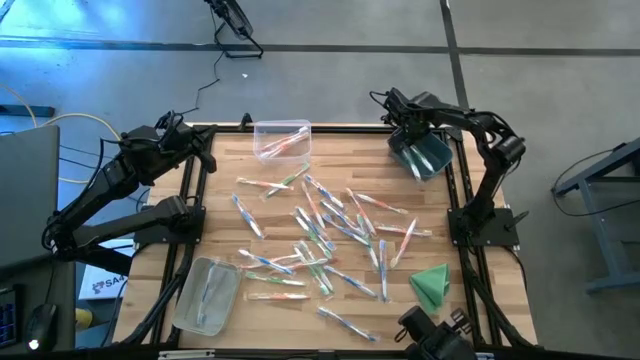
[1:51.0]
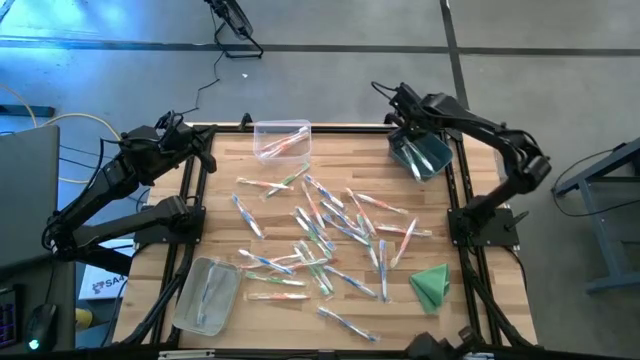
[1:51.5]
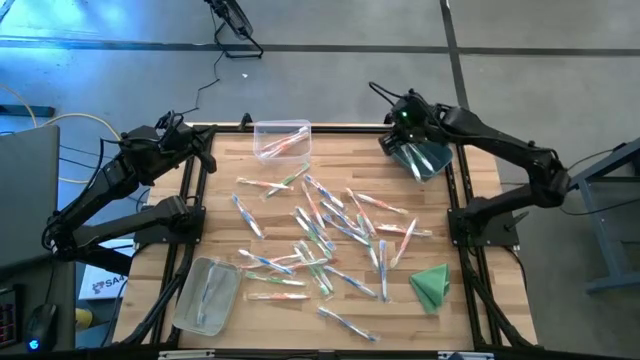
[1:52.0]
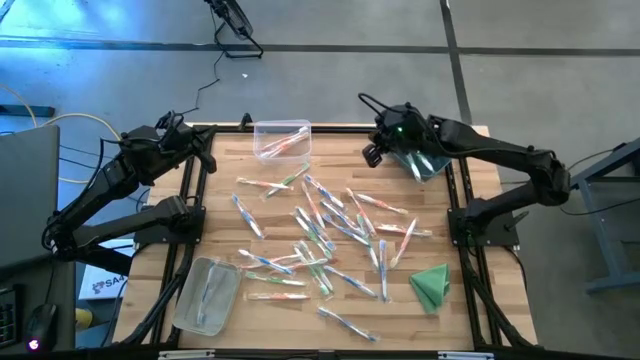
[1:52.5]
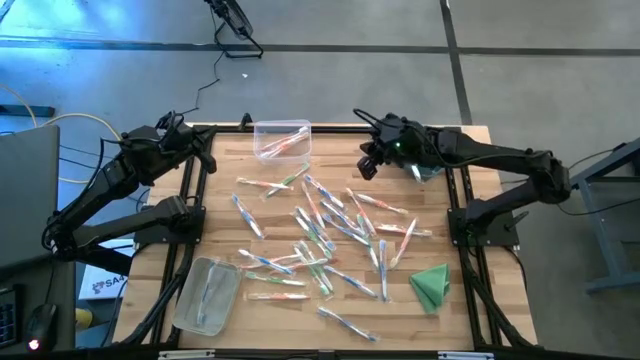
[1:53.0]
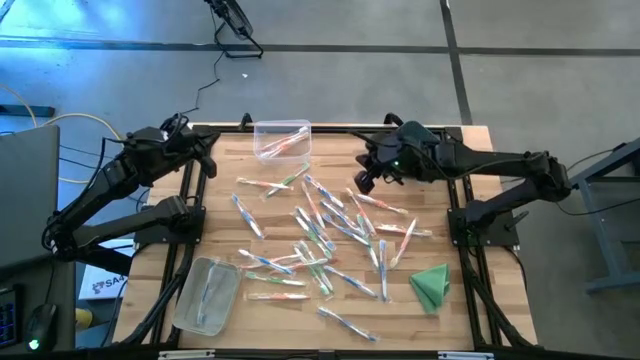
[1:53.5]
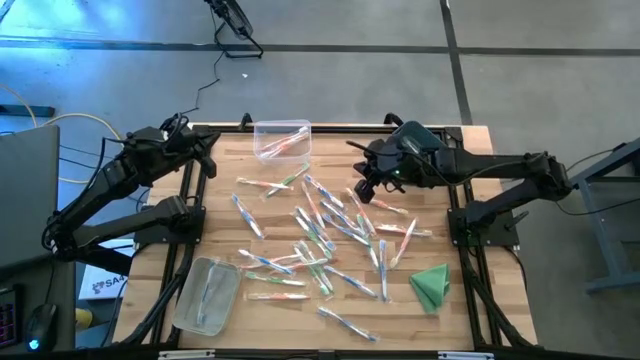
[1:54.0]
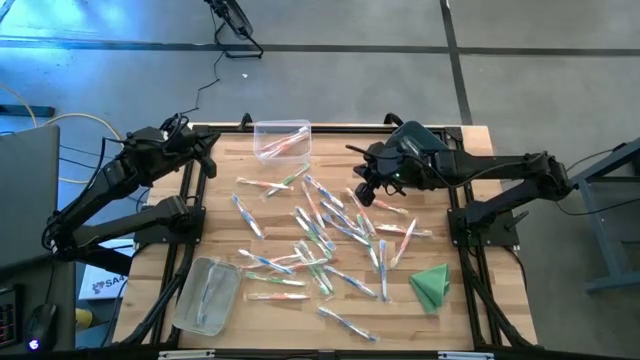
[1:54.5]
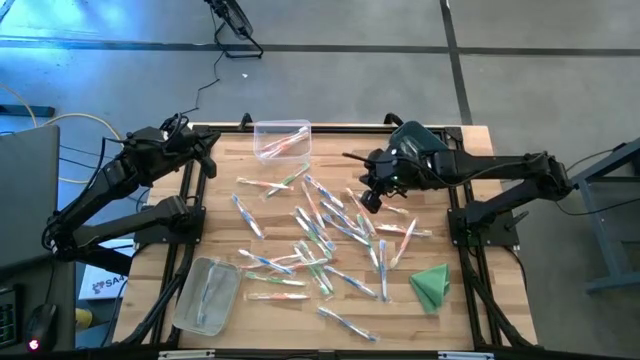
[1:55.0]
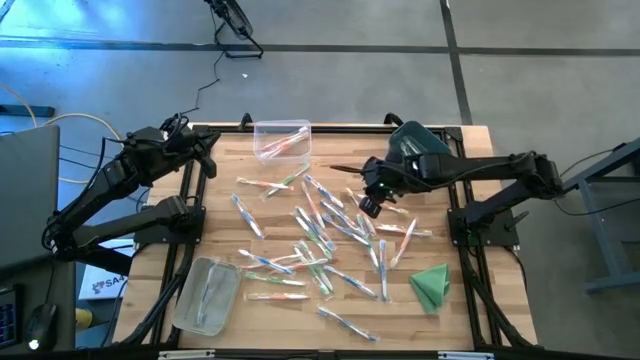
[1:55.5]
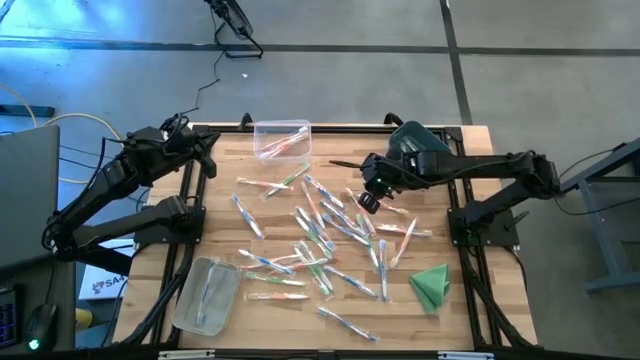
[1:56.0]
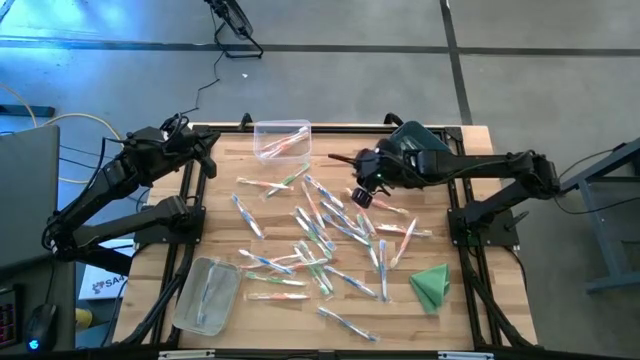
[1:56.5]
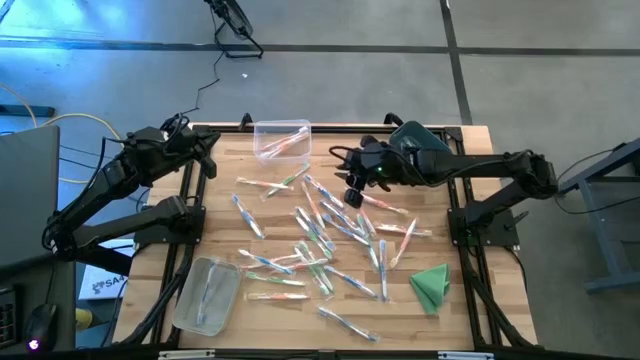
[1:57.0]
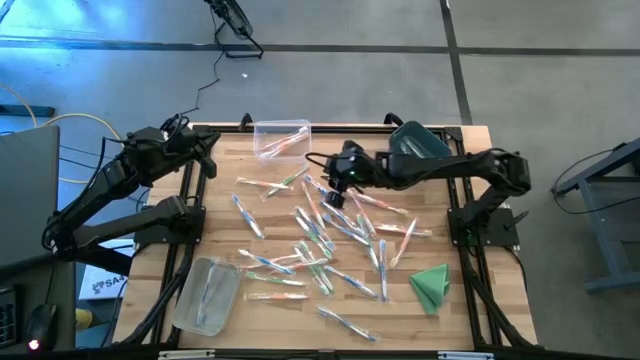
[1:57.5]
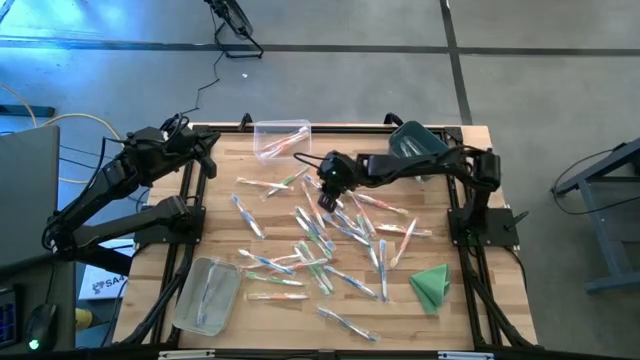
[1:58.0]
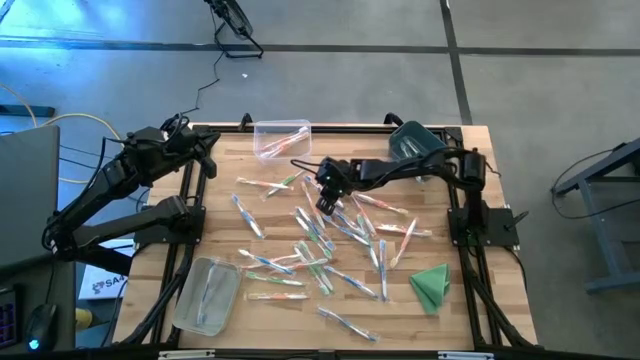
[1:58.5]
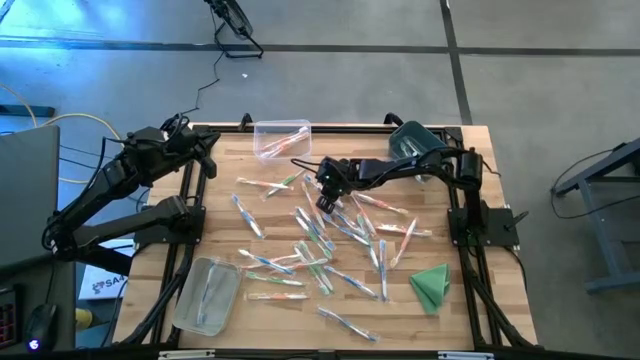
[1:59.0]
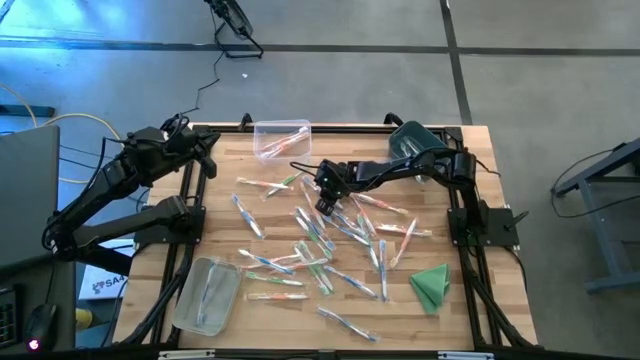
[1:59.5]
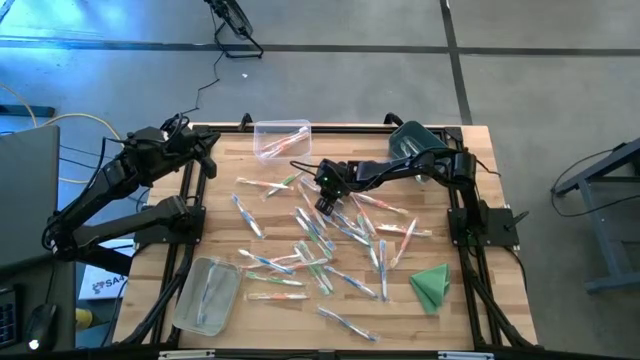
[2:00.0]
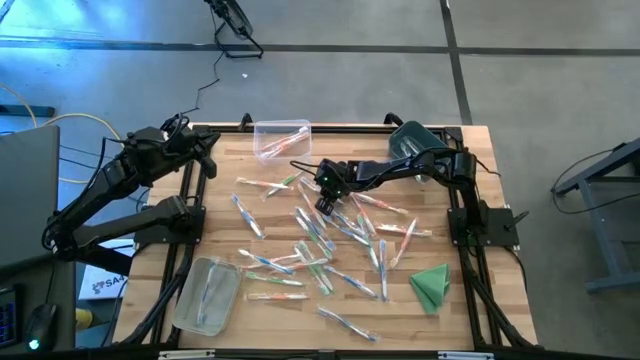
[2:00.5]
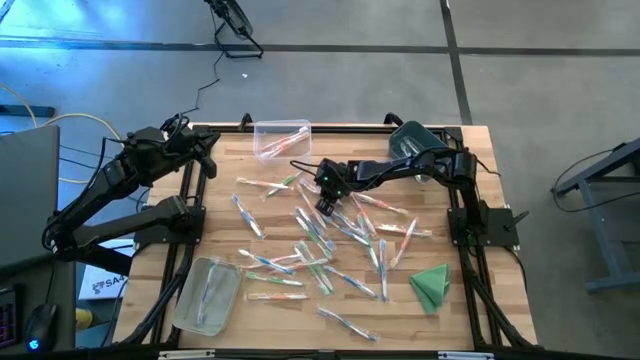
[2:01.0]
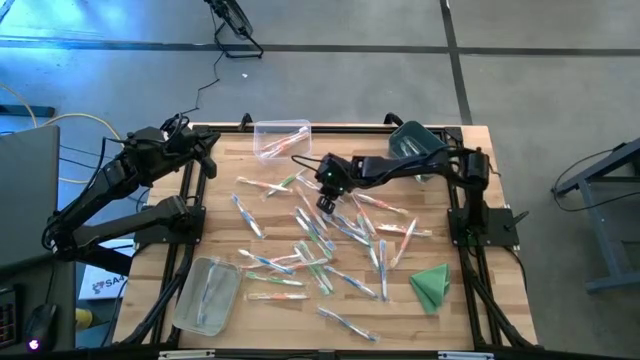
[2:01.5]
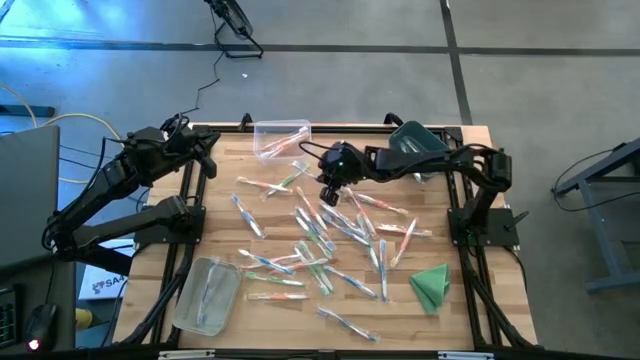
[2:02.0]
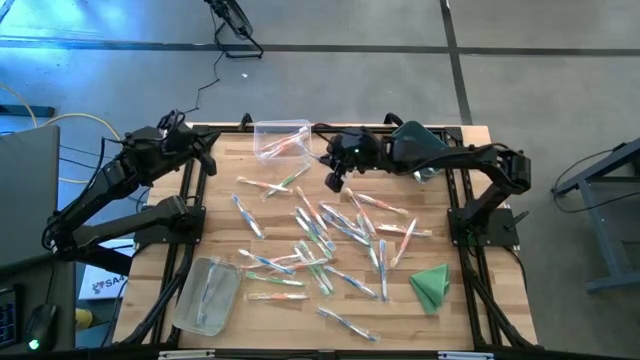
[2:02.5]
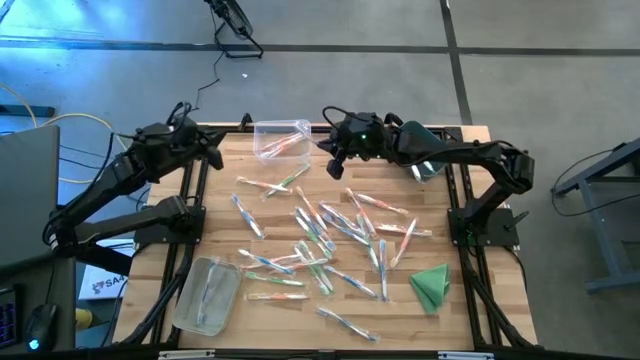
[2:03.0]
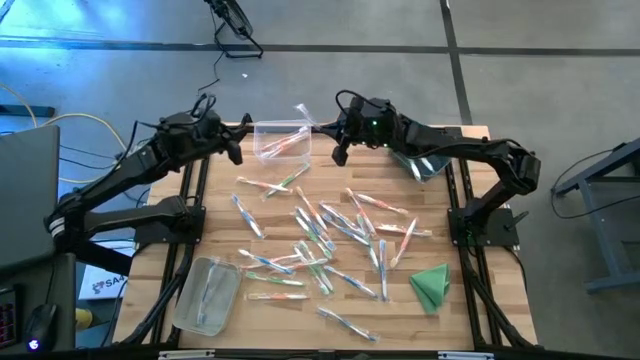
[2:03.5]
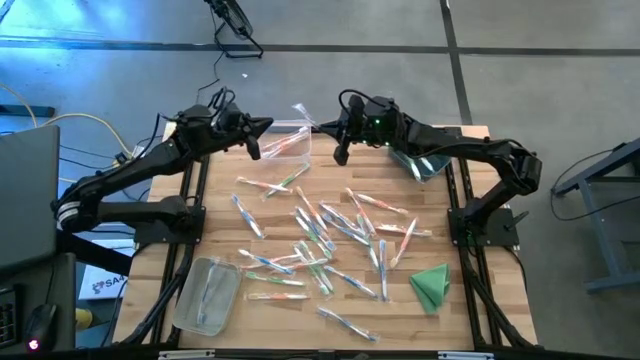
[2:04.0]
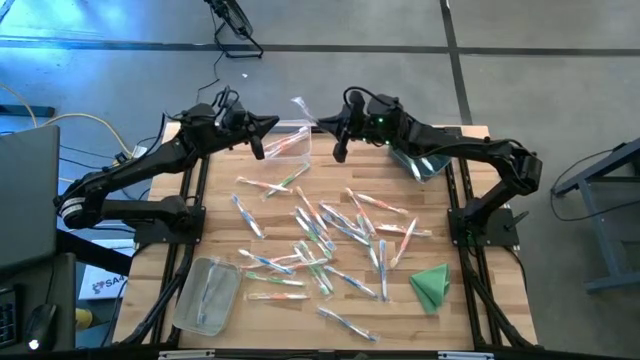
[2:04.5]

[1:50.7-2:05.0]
Task: Pick & Place Toothbrushes
Put the blue toothbrush into the gray bin
